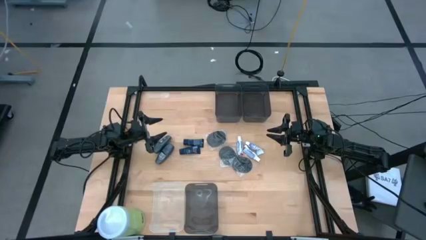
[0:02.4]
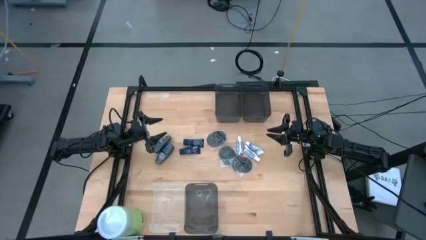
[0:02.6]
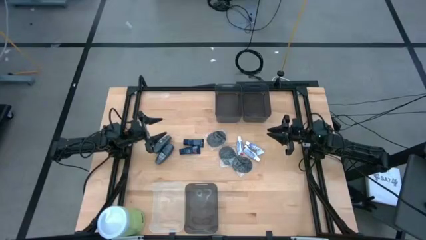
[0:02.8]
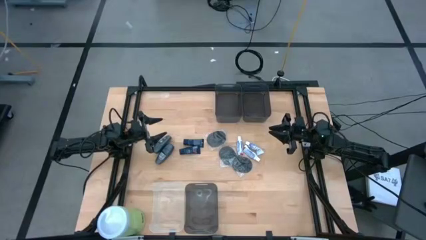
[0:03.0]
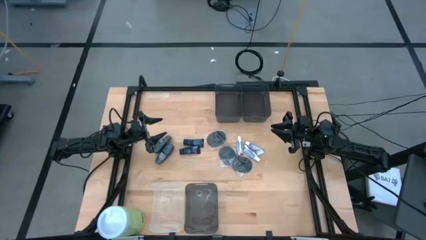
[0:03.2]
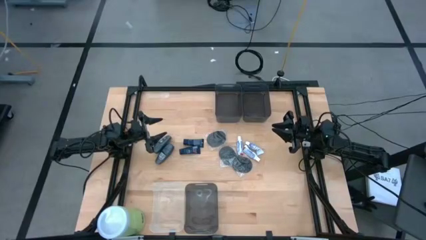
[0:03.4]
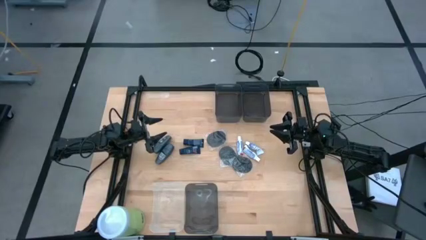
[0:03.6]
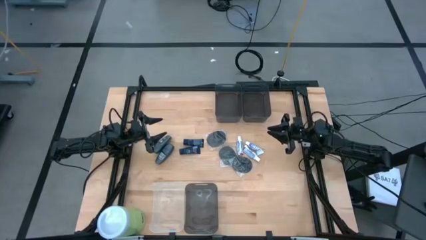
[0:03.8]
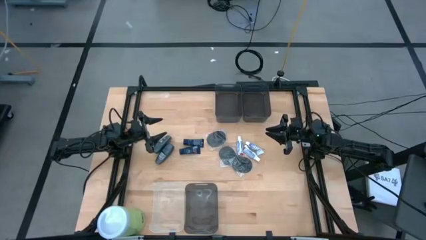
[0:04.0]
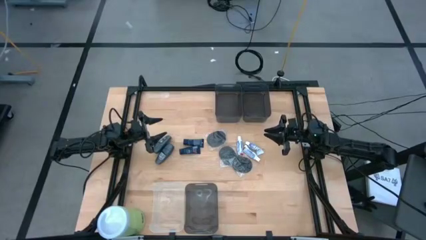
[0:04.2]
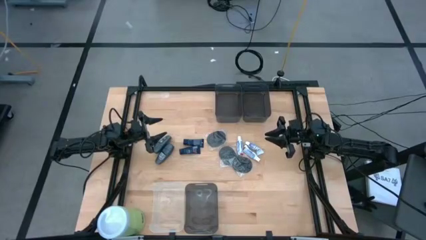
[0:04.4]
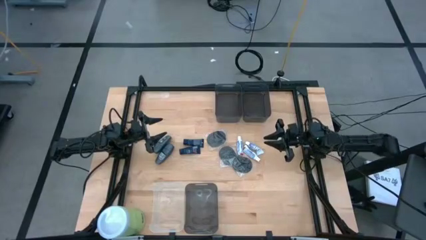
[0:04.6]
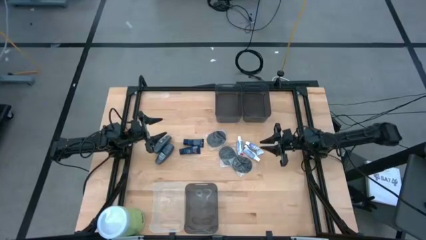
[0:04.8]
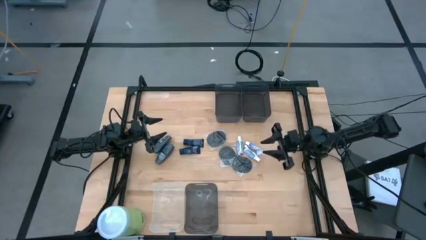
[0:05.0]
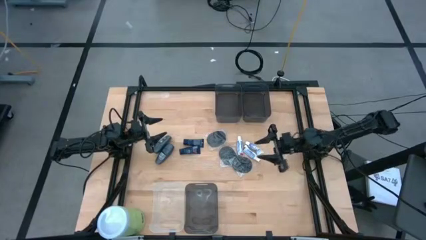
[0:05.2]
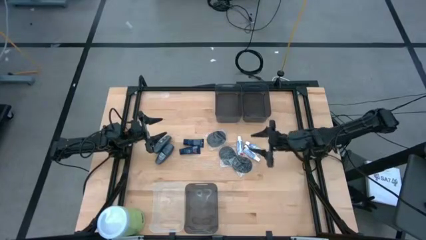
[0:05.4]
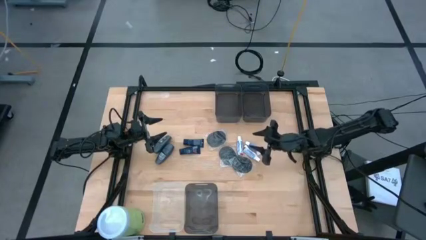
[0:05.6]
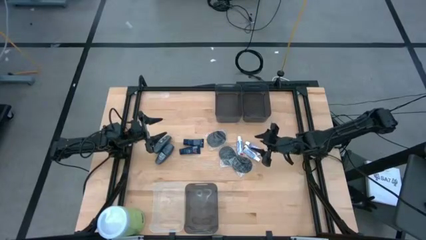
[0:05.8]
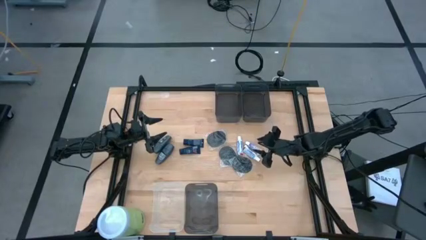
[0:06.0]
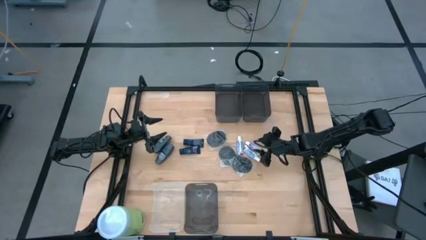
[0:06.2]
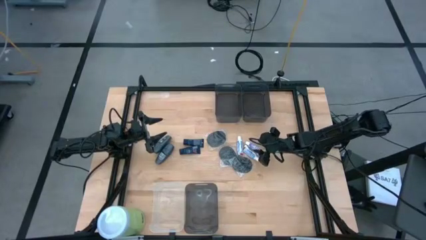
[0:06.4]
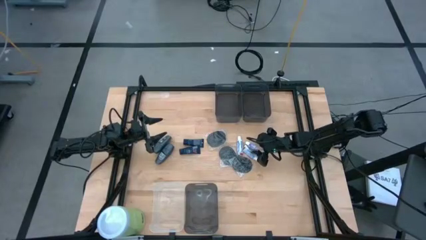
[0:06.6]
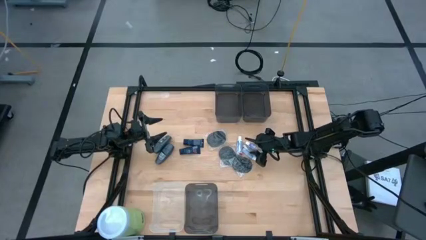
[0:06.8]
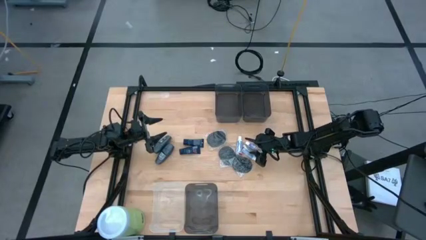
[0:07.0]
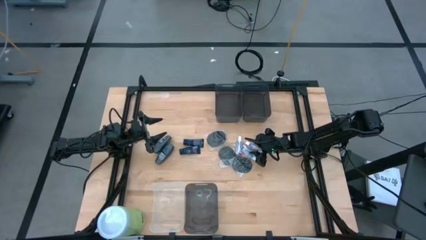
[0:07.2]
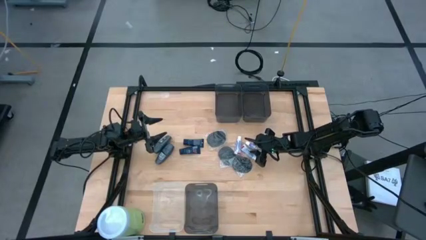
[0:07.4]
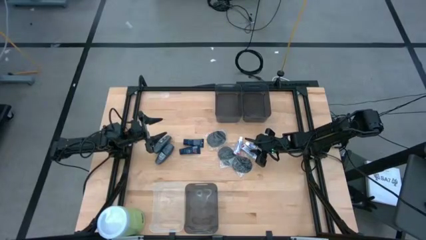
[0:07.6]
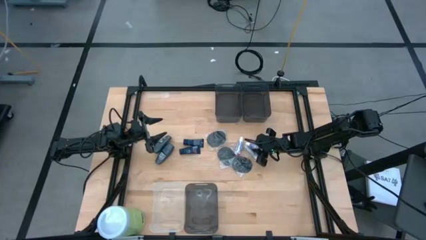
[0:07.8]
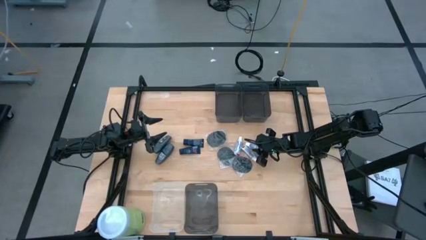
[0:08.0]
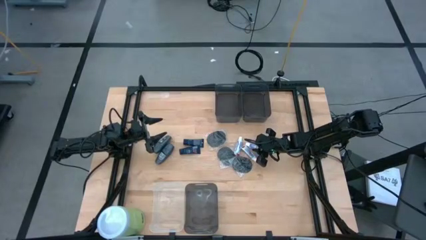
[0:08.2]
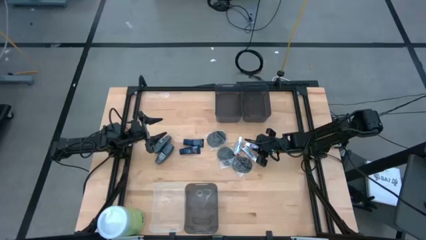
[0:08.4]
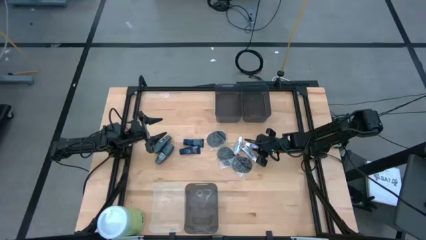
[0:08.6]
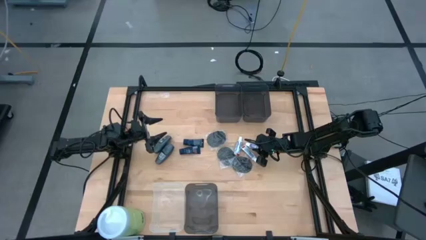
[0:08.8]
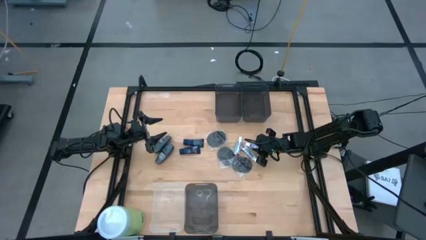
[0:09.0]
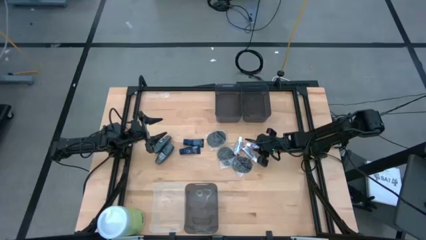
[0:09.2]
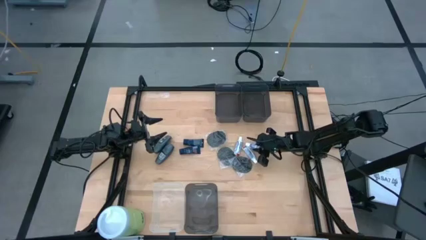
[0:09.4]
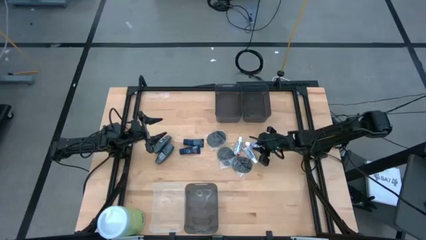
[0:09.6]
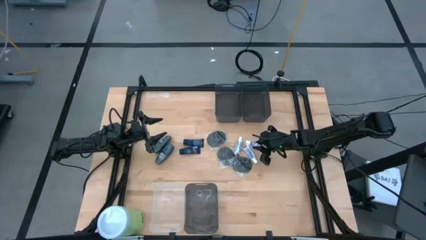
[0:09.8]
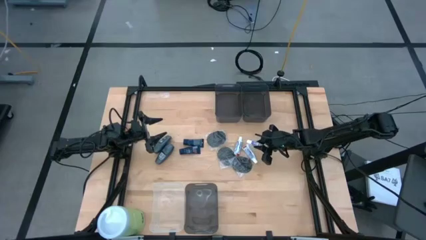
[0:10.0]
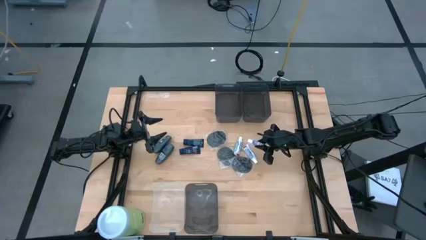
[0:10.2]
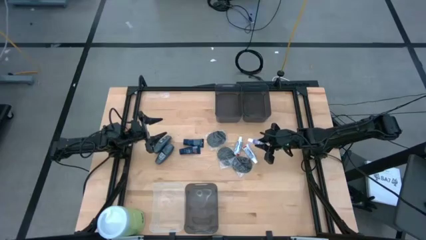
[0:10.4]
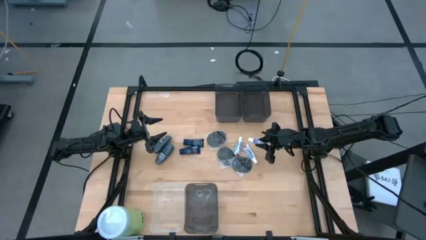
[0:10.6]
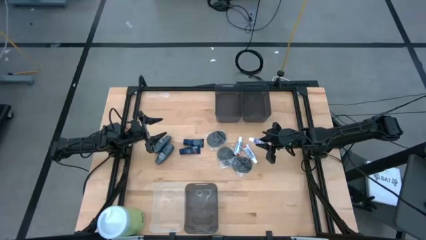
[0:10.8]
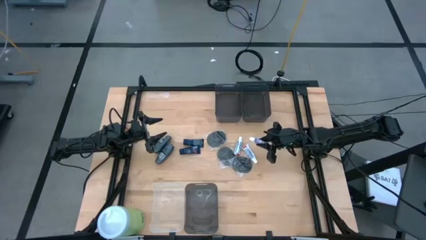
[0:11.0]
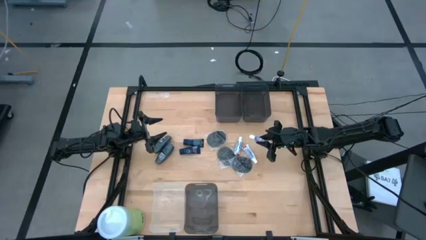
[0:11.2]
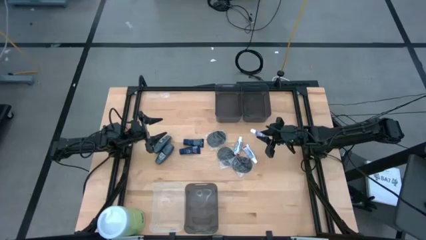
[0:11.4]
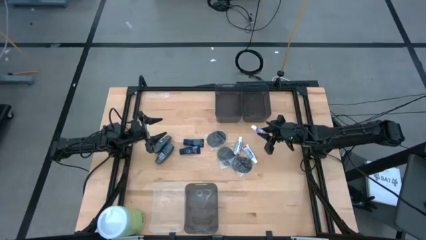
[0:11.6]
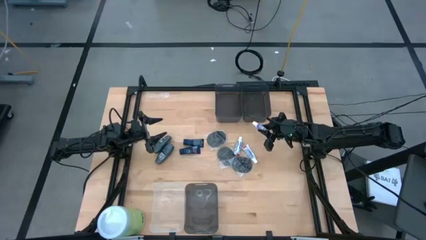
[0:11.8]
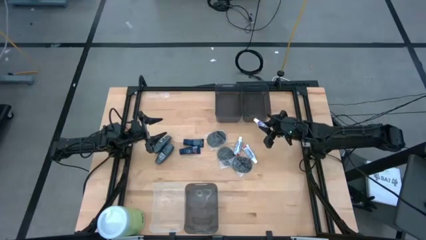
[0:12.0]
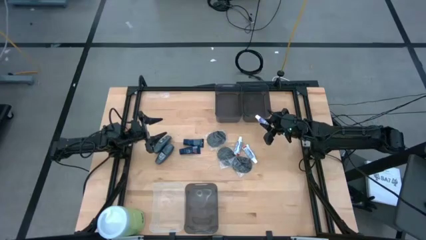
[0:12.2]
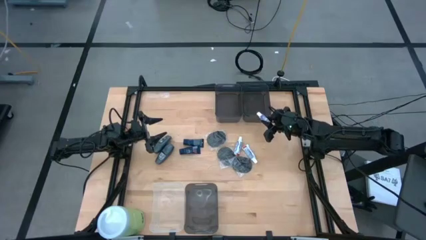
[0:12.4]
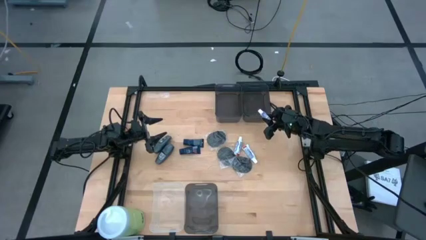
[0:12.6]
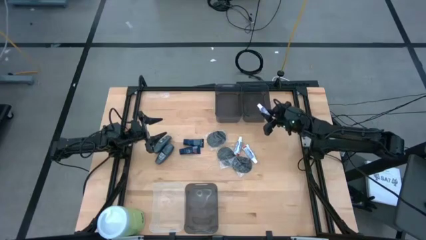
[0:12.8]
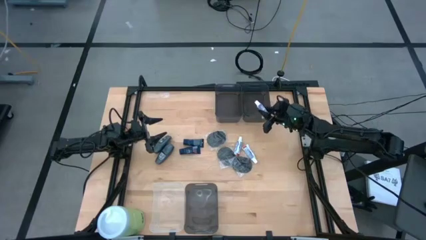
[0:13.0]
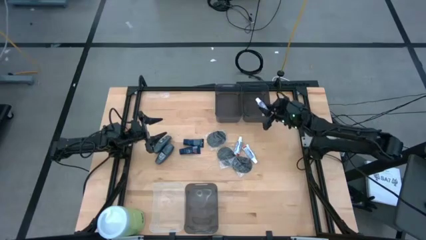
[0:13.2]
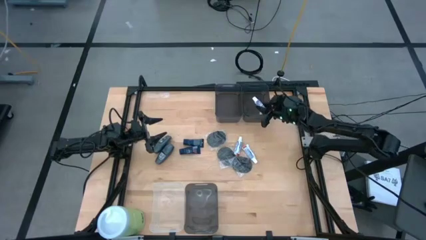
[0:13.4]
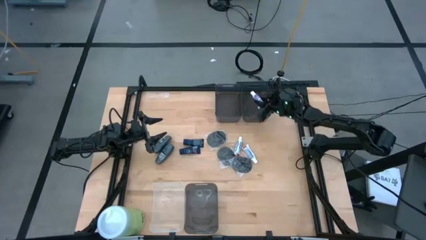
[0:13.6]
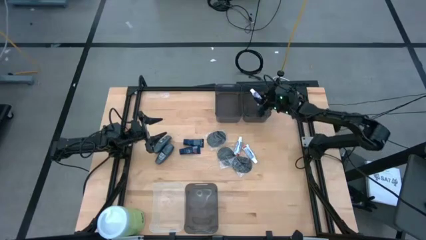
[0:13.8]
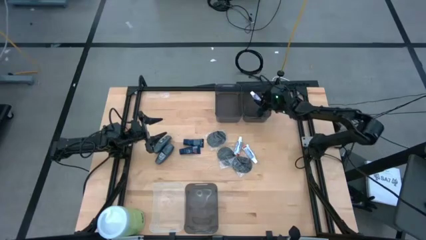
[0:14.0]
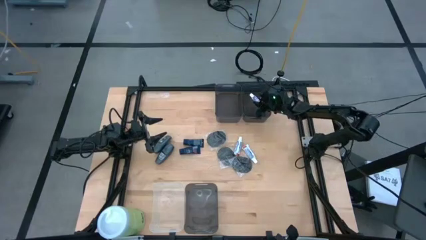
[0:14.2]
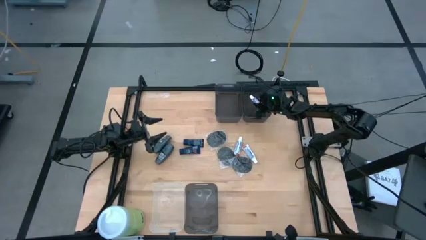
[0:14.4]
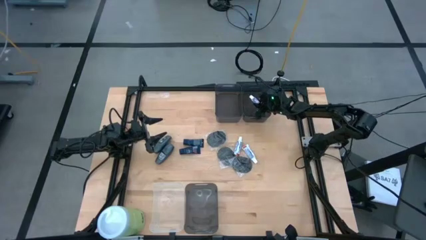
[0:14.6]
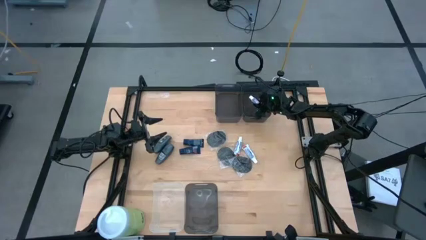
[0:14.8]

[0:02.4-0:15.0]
Task: Pick & Place Travel size toiletries
Put the right toothpaste into the top right black bin

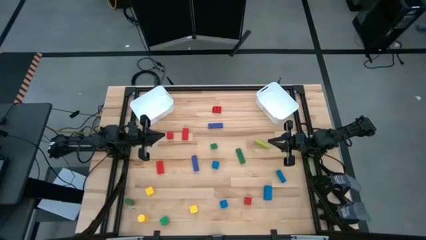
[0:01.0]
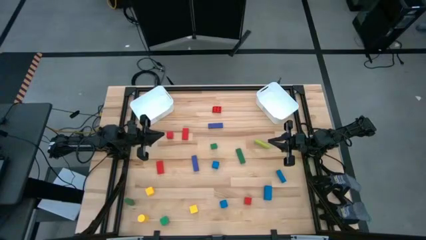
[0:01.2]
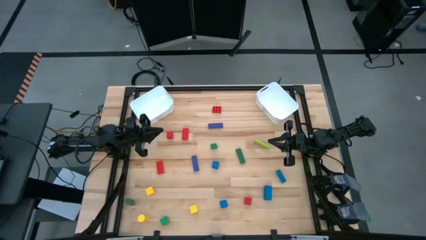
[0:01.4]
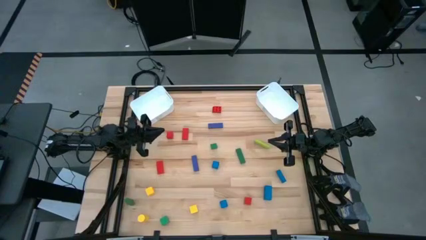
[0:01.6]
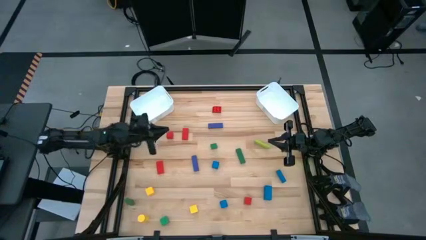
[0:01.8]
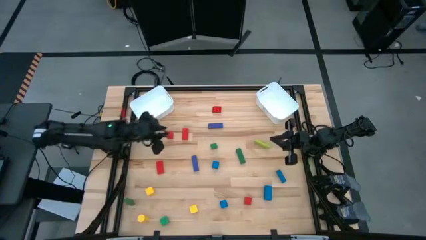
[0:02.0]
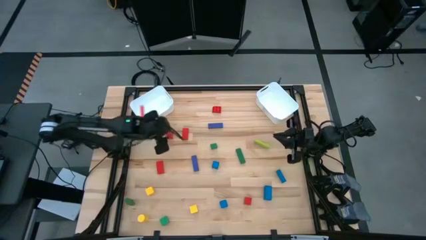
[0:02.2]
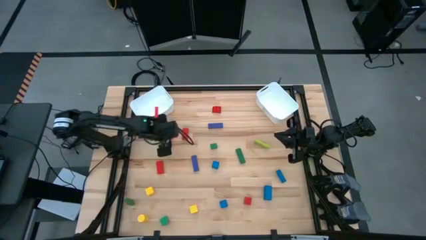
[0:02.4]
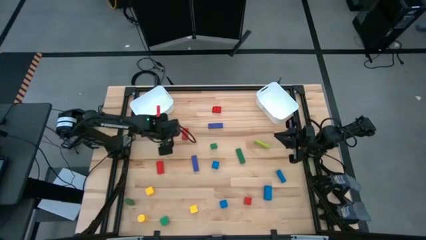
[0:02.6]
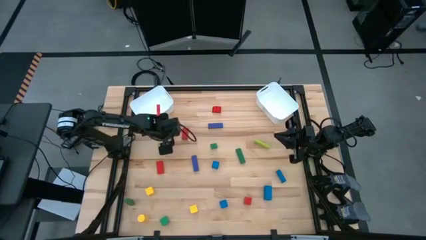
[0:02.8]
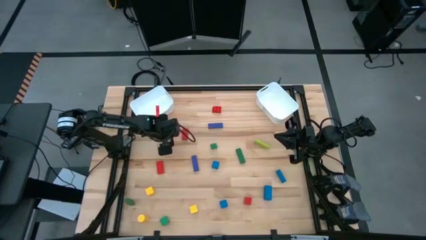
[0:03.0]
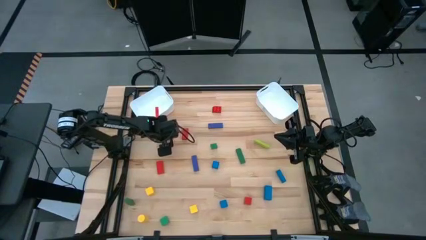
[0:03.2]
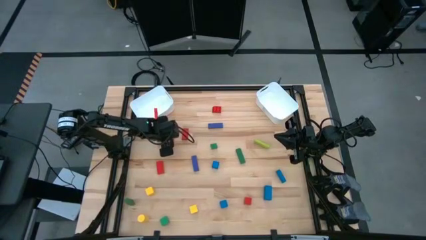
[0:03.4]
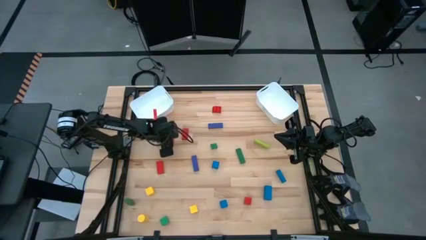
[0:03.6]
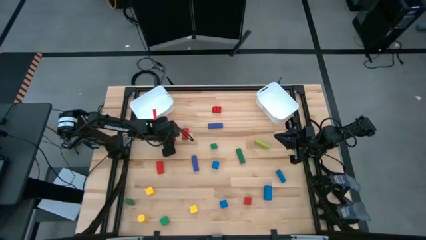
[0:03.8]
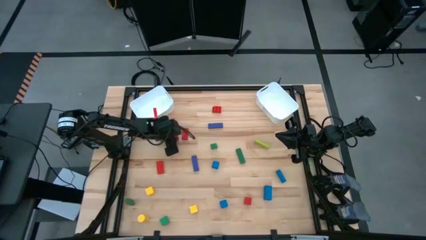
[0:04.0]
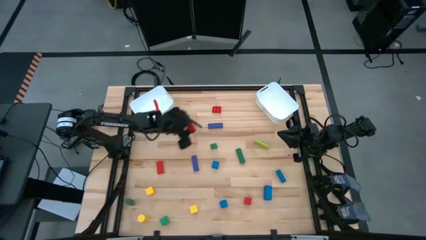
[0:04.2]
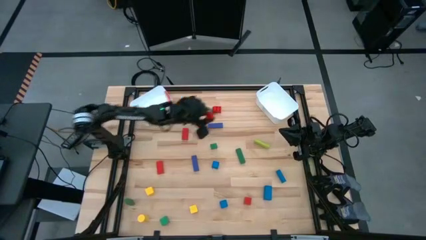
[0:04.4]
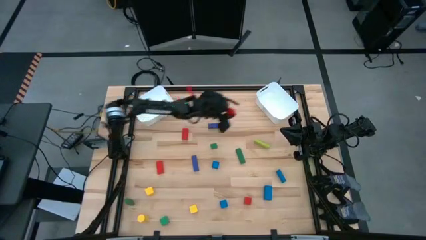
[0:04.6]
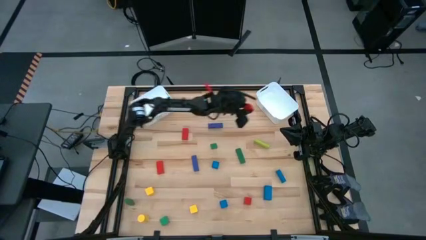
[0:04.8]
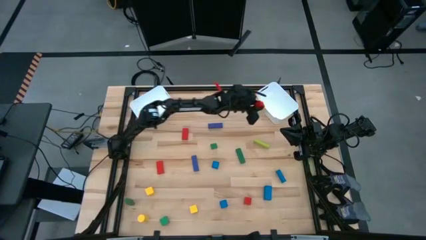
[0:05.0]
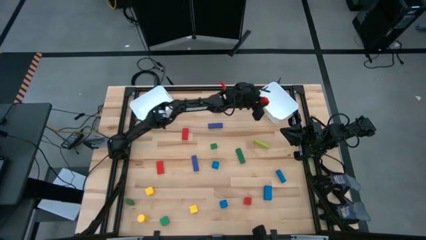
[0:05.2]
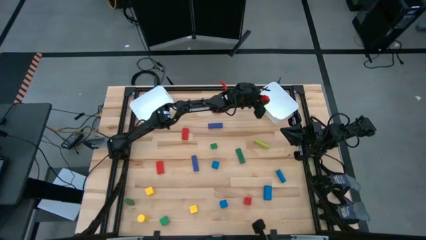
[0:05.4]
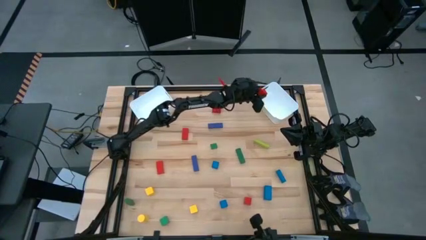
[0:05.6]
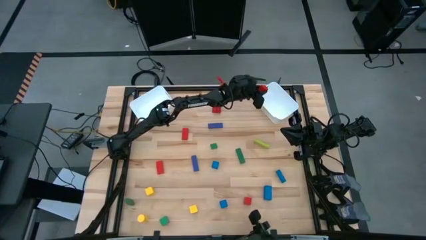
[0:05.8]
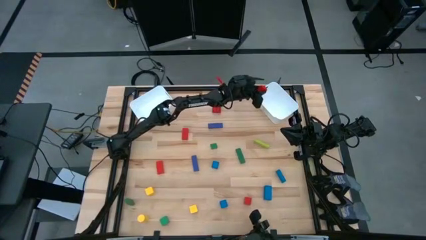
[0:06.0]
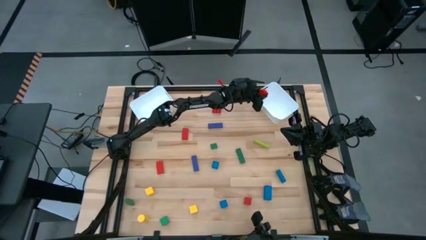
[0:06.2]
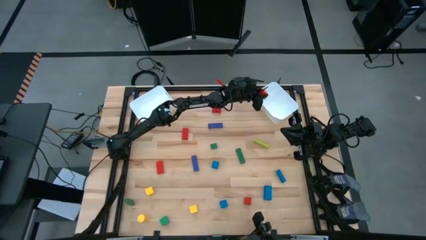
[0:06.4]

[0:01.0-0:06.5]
Task: Sort blocks by size
Put the small red block into the right white bin
